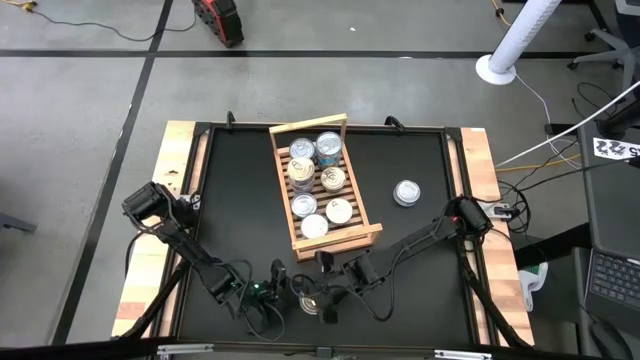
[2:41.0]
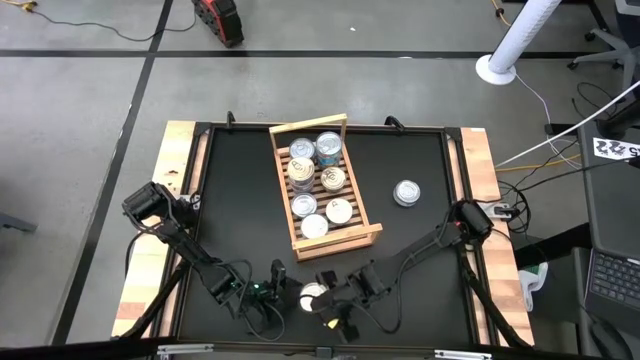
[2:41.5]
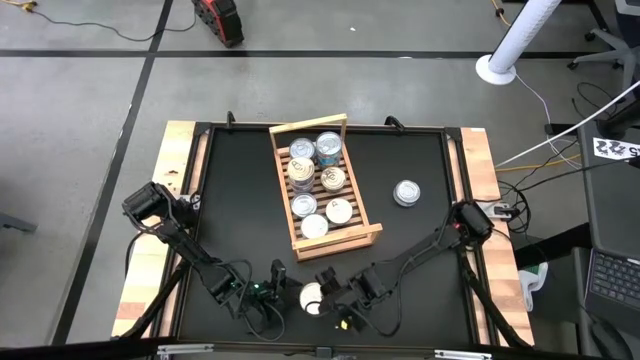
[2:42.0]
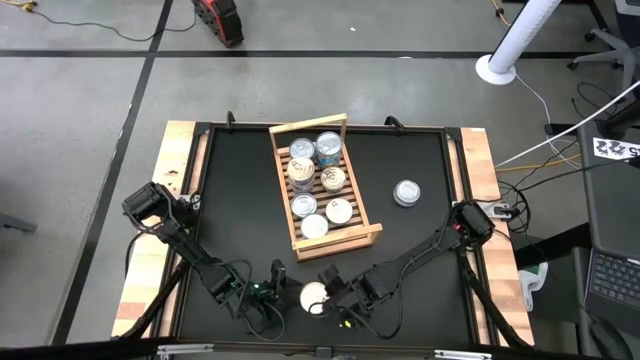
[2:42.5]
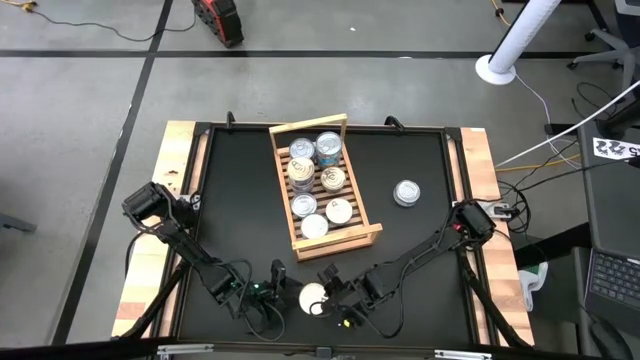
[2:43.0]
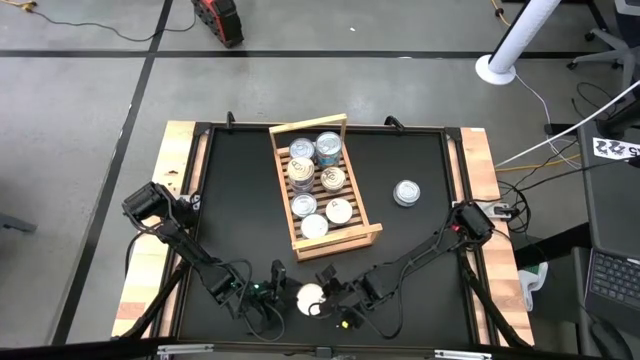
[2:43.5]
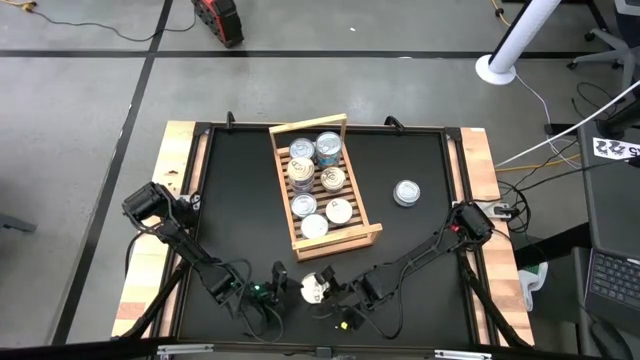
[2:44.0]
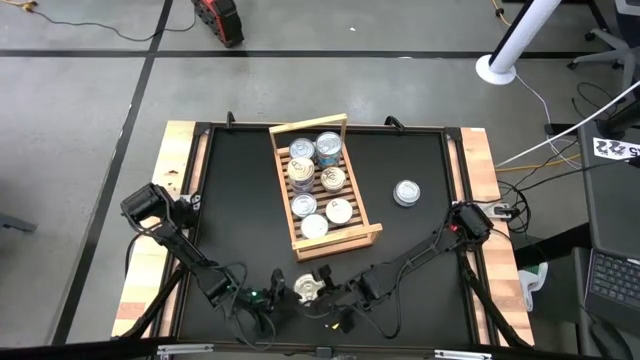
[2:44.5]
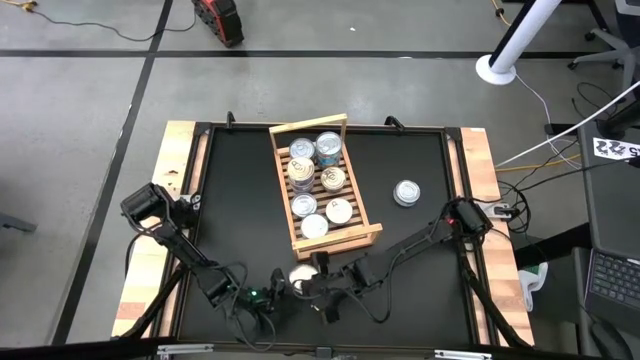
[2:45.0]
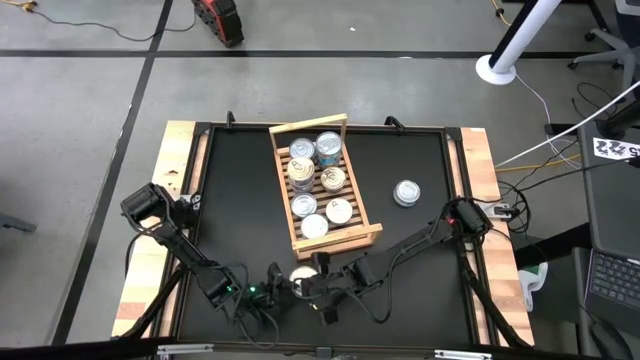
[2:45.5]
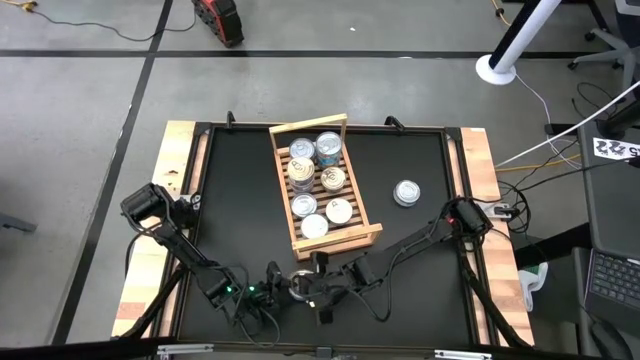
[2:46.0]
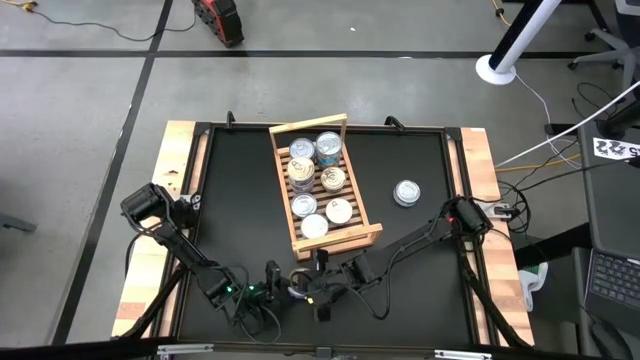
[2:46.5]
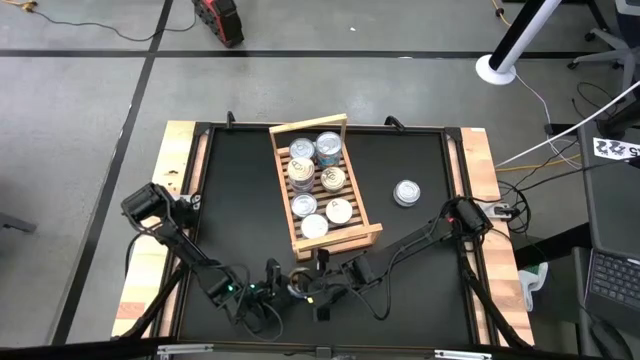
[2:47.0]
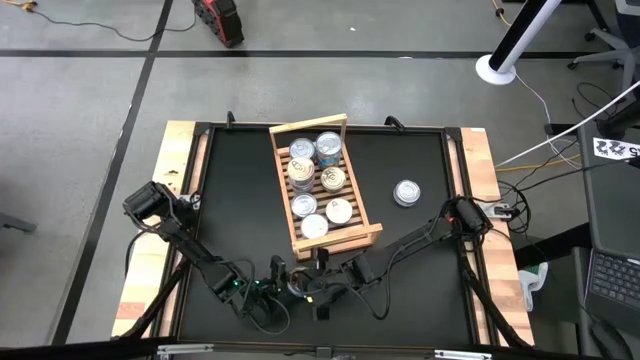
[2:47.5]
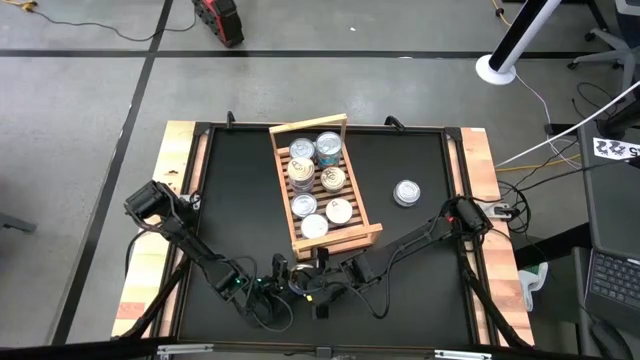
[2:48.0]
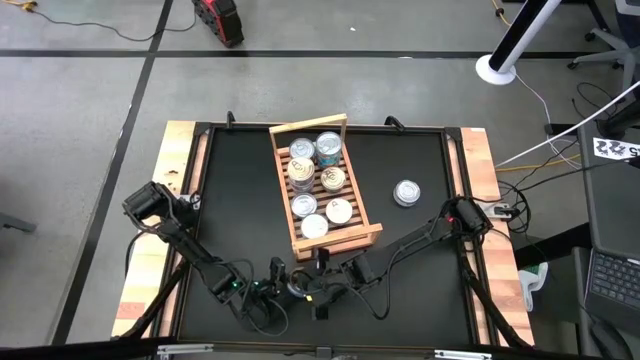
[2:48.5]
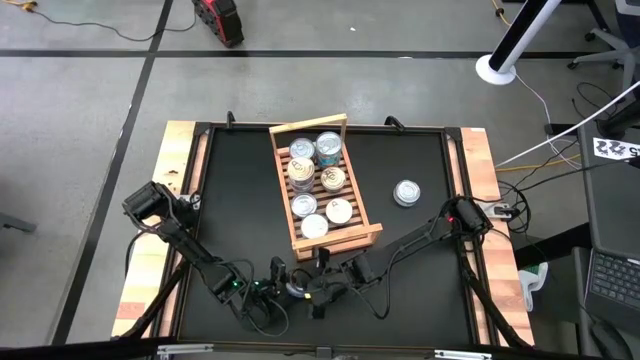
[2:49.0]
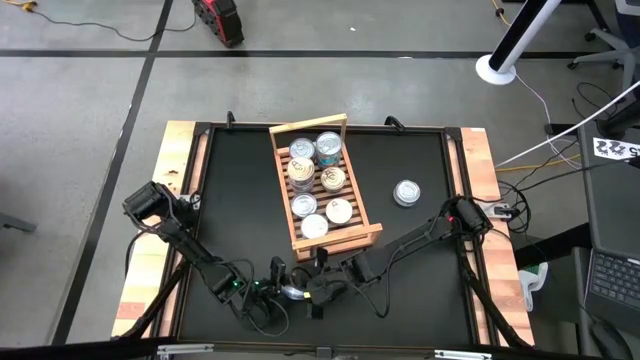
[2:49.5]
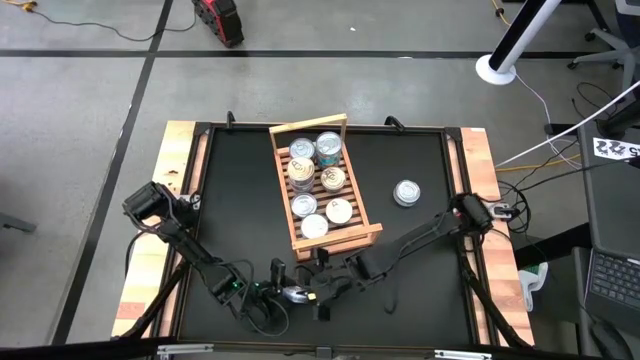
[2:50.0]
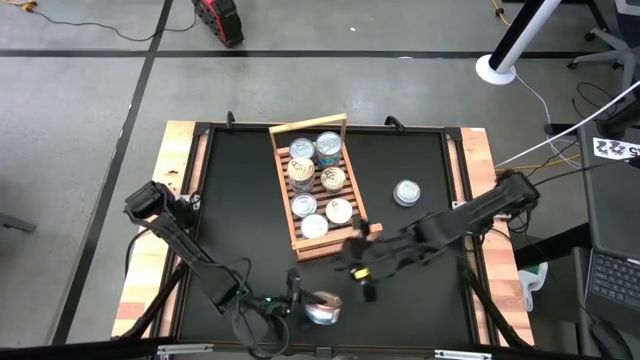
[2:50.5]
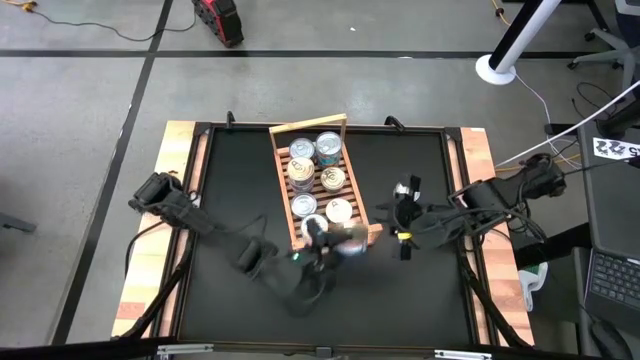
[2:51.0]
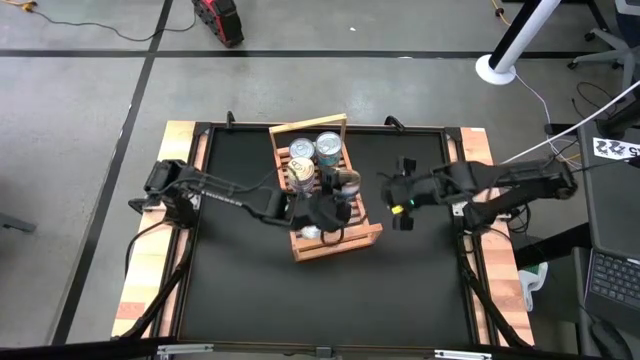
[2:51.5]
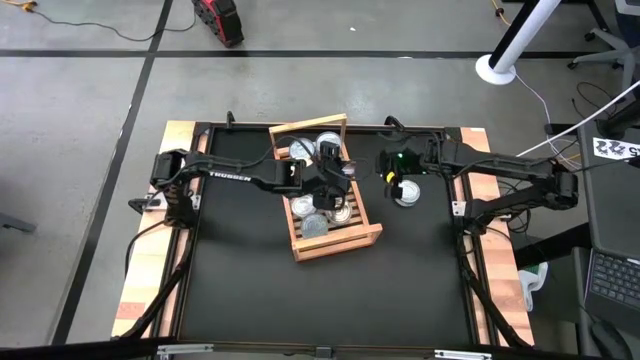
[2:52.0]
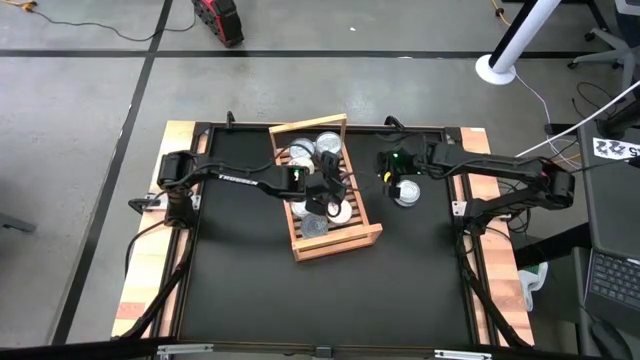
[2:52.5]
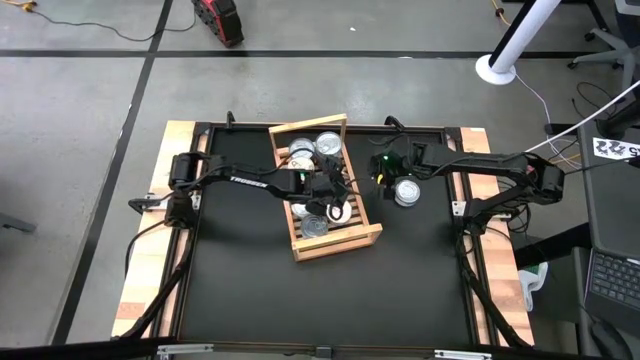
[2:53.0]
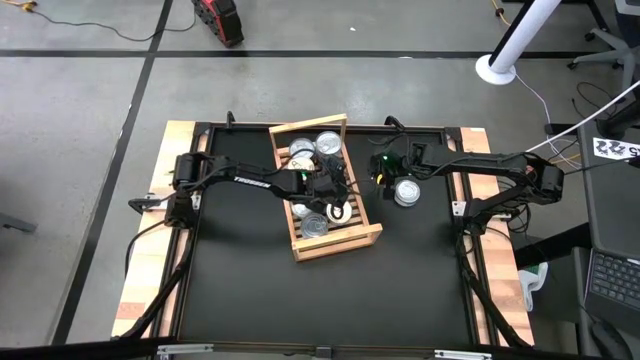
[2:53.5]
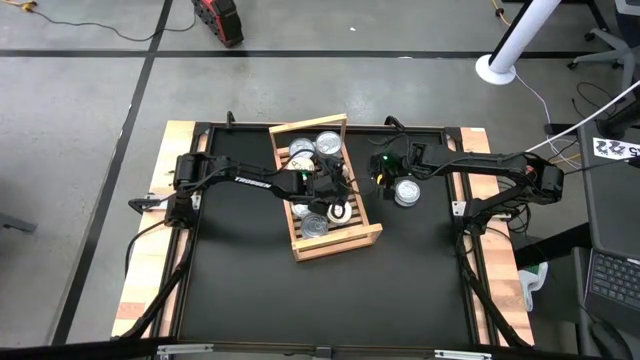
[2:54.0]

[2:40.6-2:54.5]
Task: Stack canned seafood by type on shelf
Stack the blue-pink tuna can on top of the other blue-pink tuna can on the shelf

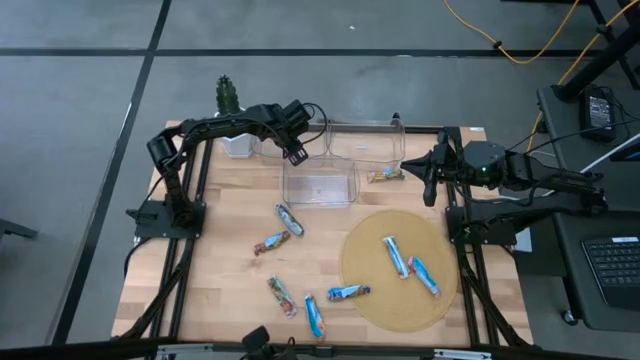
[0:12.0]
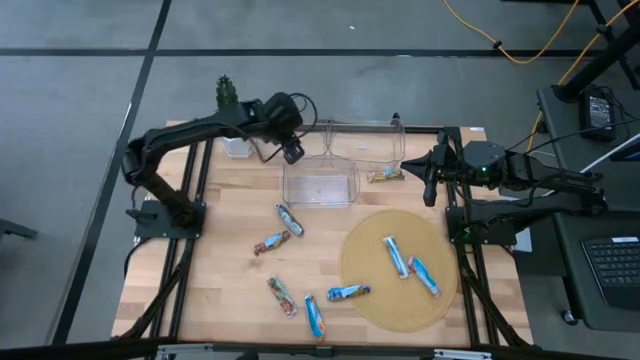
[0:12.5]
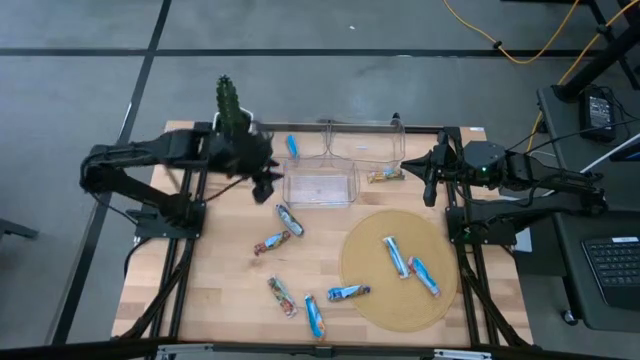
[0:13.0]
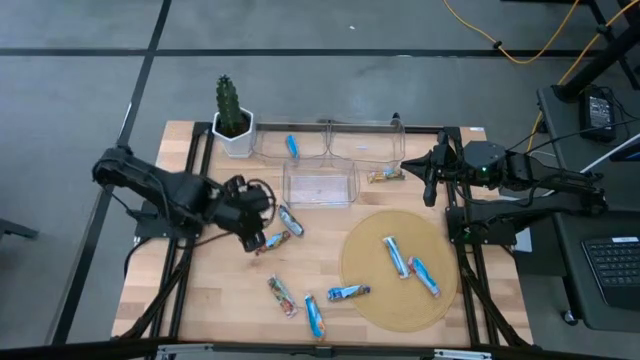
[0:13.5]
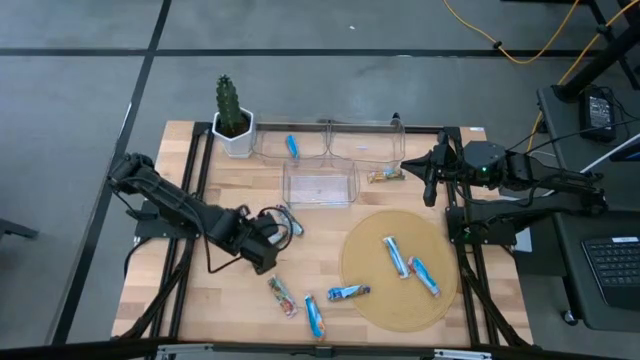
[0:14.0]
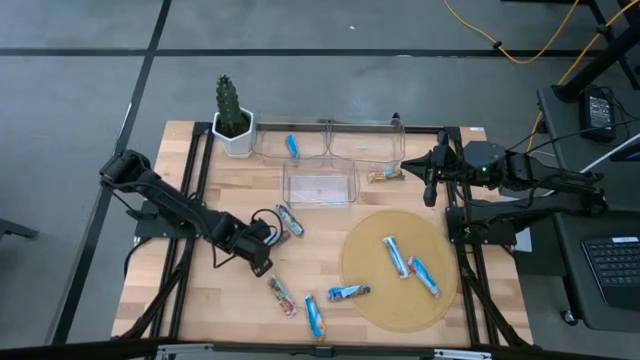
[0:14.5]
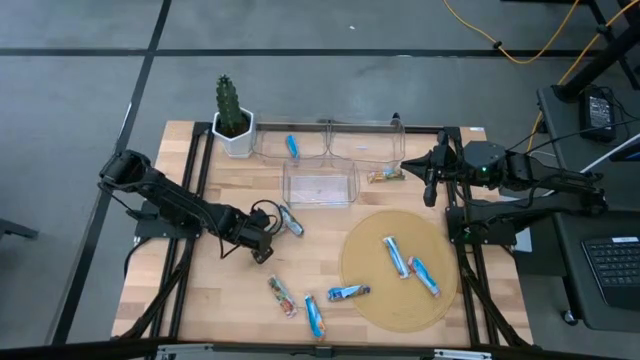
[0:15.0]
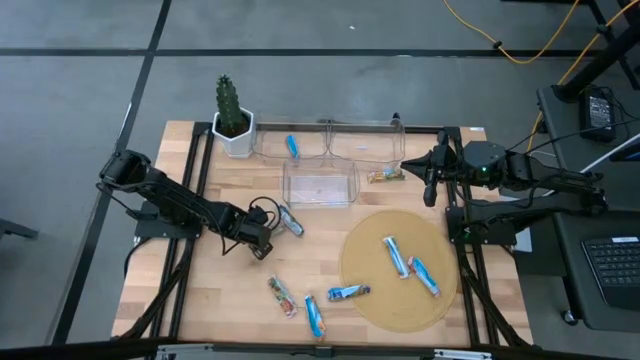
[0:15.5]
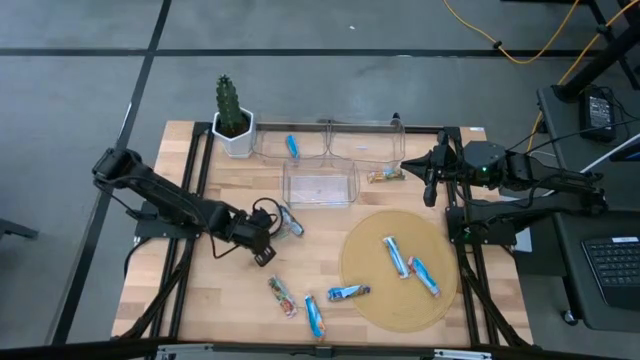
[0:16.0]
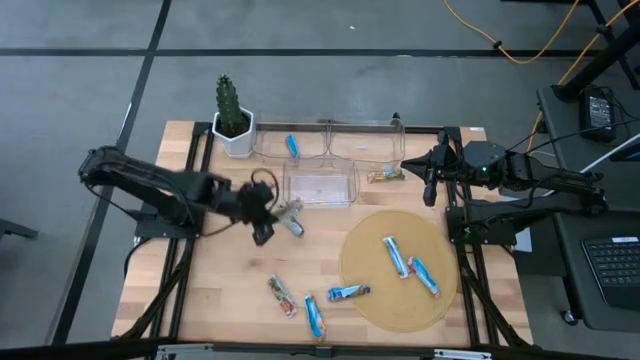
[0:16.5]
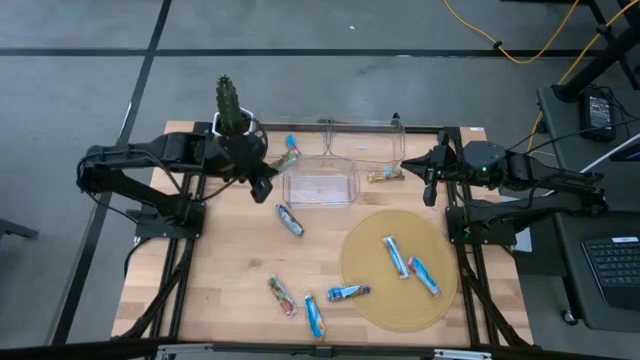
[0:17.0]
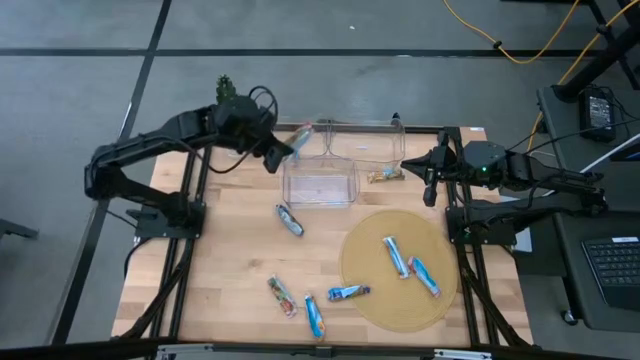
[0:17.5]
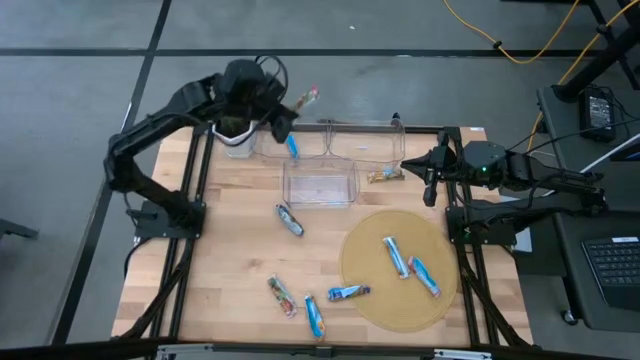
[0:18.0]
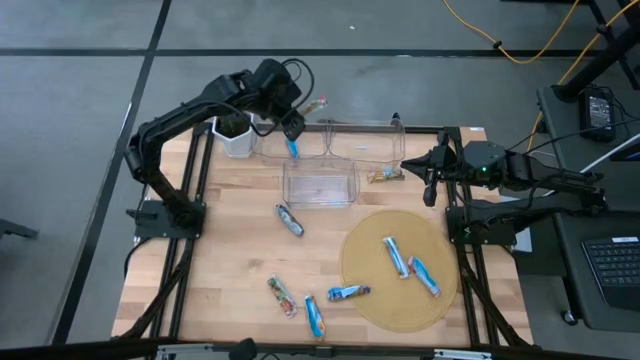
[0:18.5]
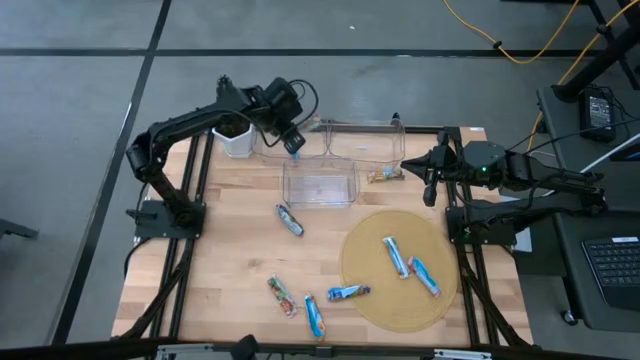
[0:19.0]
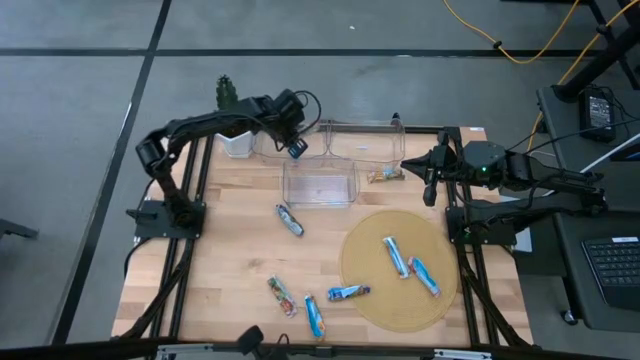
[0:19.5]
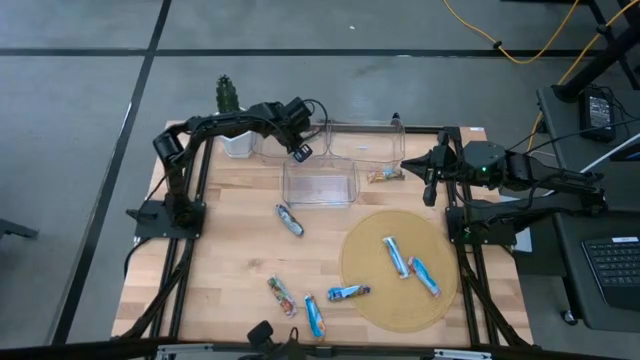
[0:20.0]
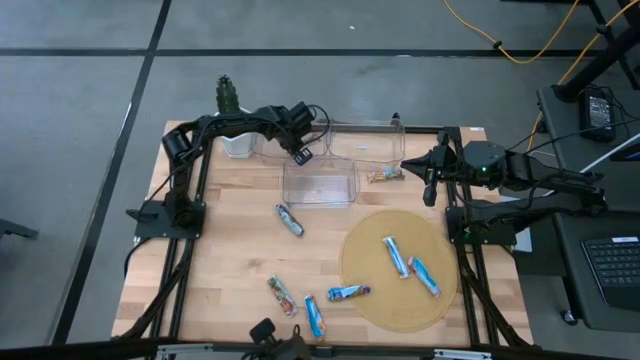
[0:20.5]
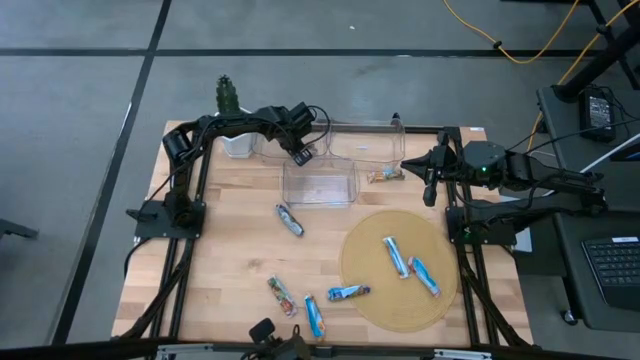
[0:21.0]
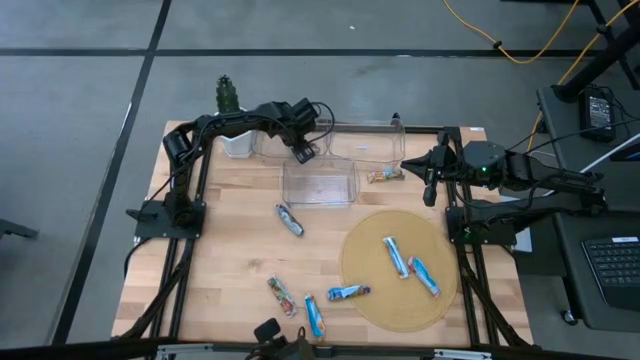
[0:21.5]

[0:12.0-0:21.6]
Task: Pick and place Granola Bars by type
Put the red granola bar into the top left transparent bin
